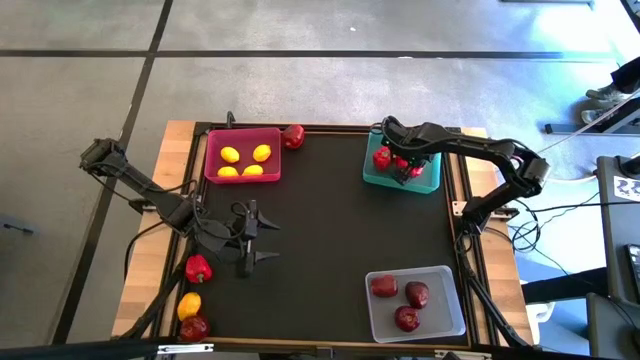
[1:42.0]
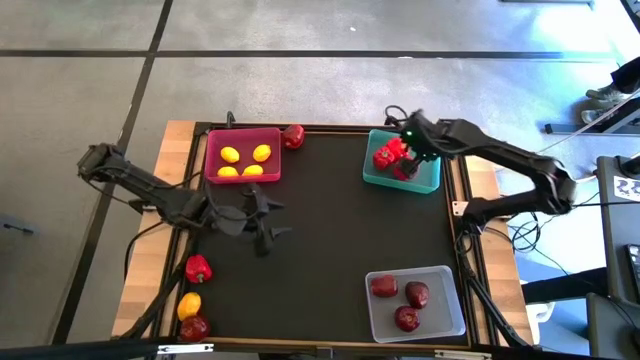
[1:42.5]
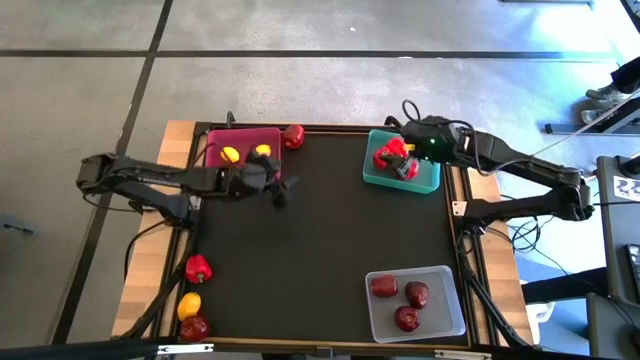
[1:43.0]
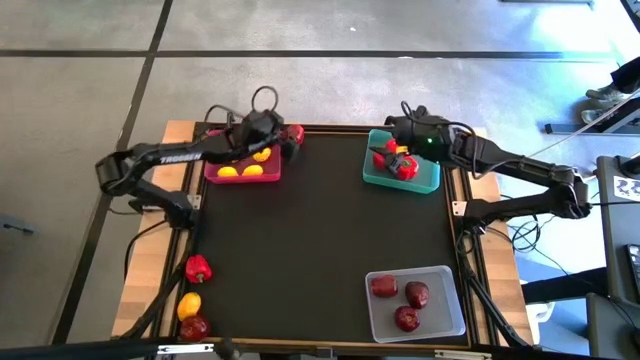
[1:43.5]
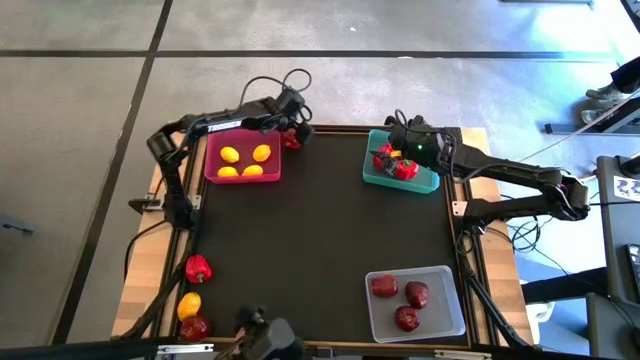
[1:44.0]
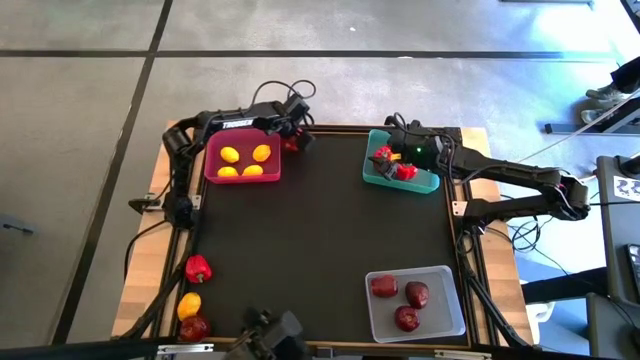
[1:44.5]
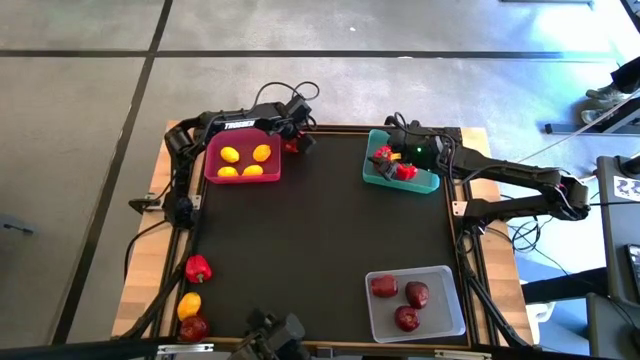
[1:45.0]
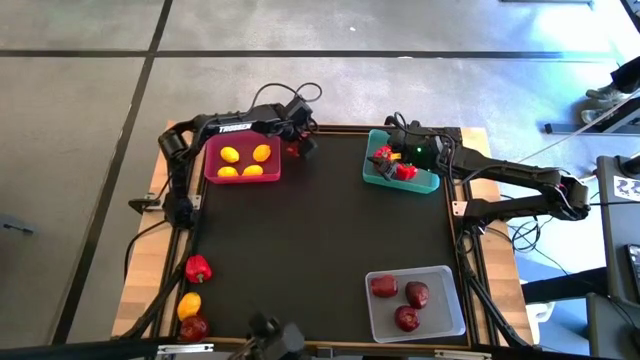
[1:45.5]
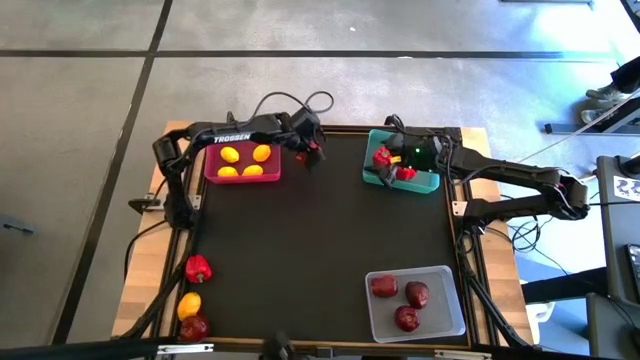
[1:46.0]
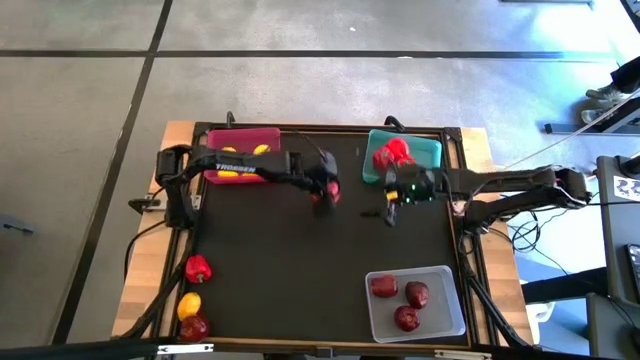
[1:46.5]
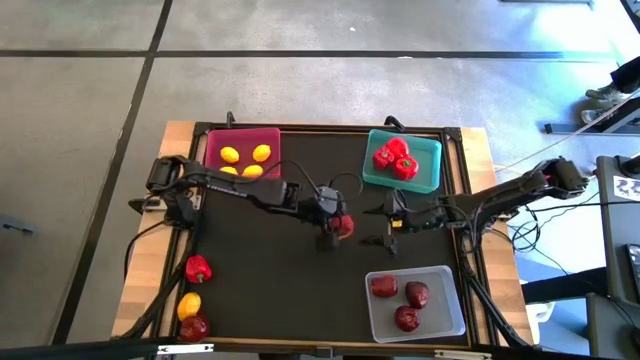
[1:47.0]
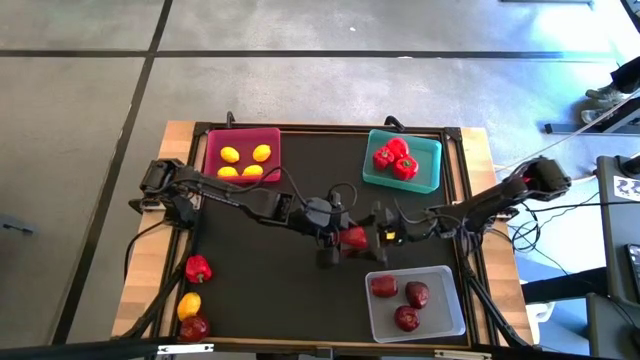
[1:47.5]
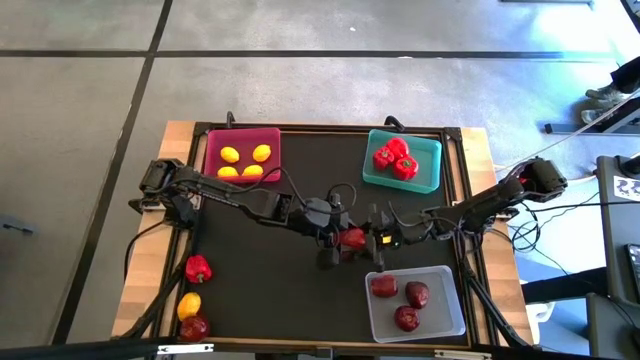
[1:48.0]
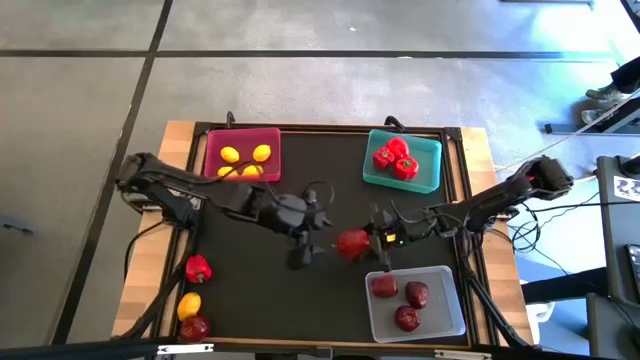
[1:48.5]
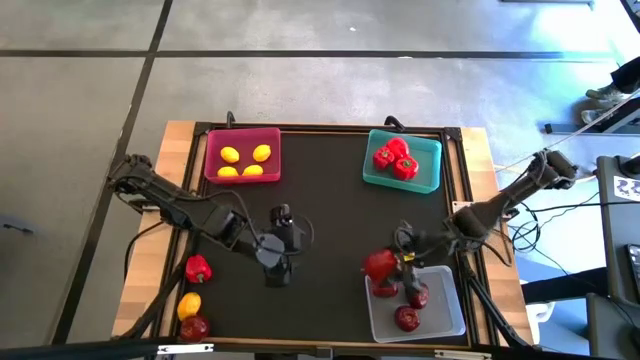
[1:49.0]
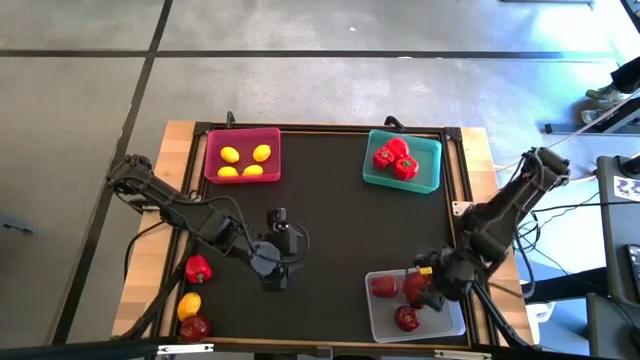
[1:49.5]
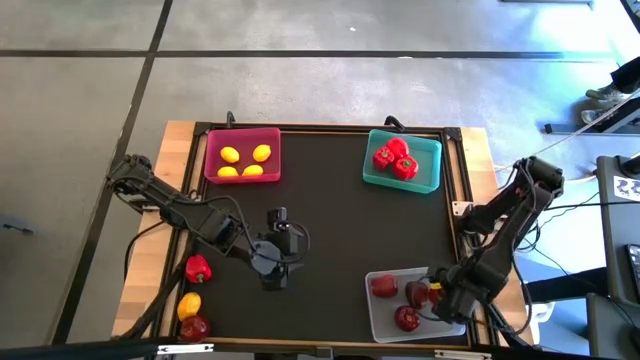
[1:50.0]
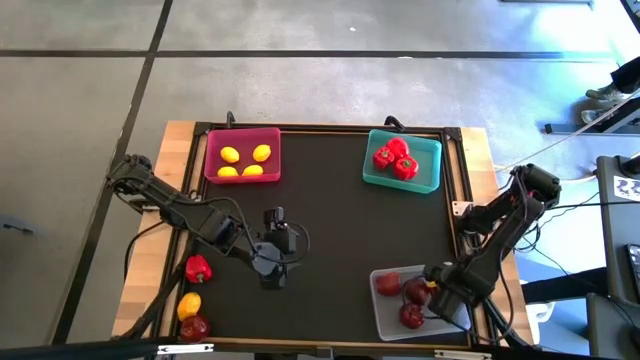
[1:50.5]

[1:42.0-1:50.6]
Task: Sort produce into baskets
Put the apple into the transparent bin

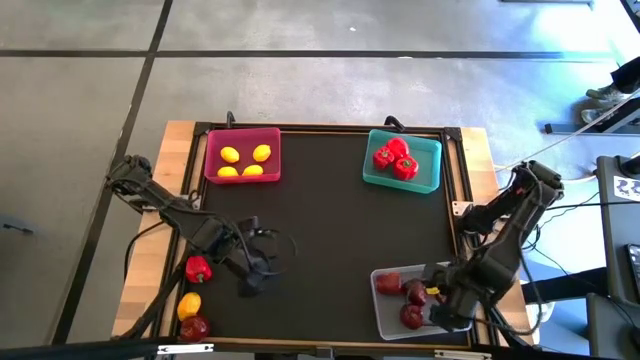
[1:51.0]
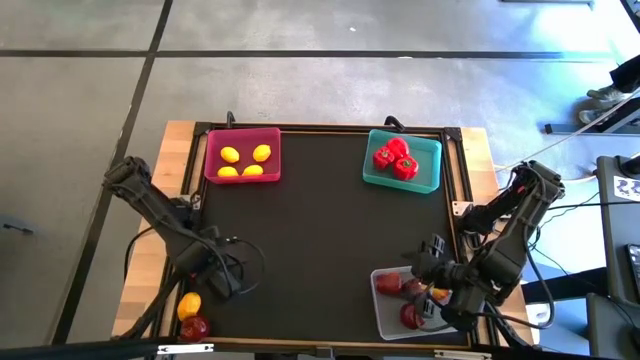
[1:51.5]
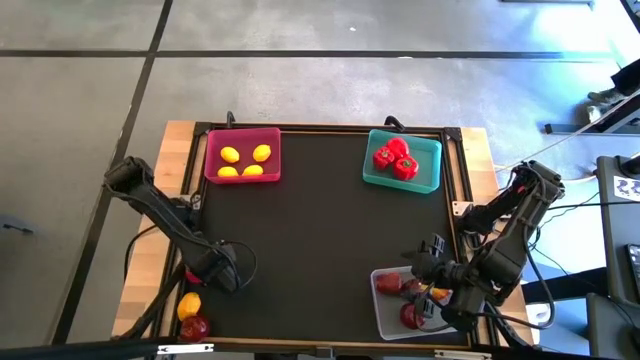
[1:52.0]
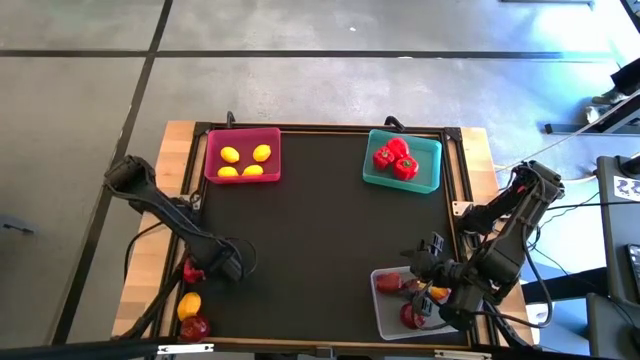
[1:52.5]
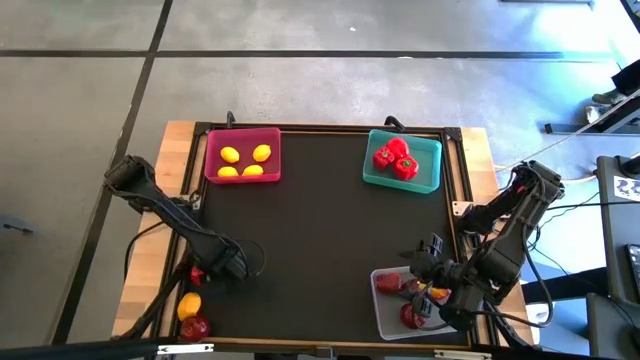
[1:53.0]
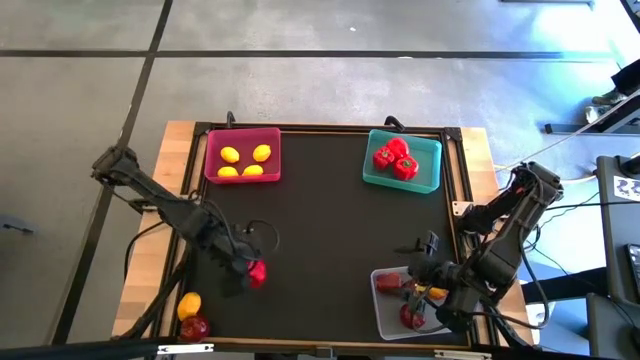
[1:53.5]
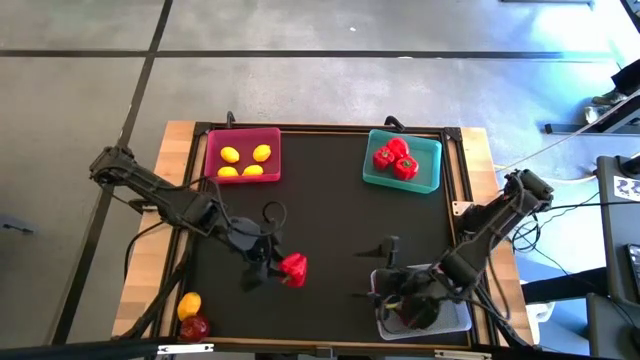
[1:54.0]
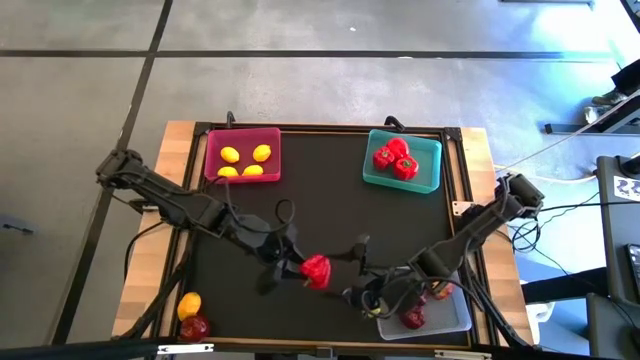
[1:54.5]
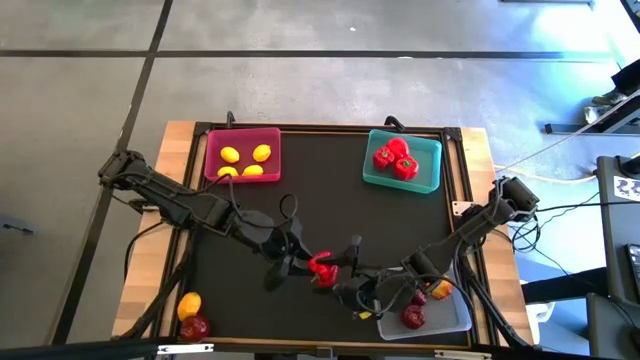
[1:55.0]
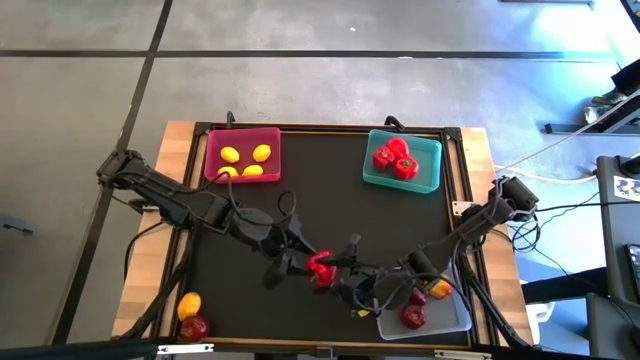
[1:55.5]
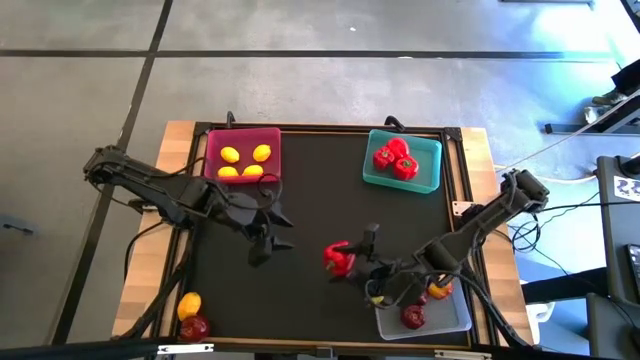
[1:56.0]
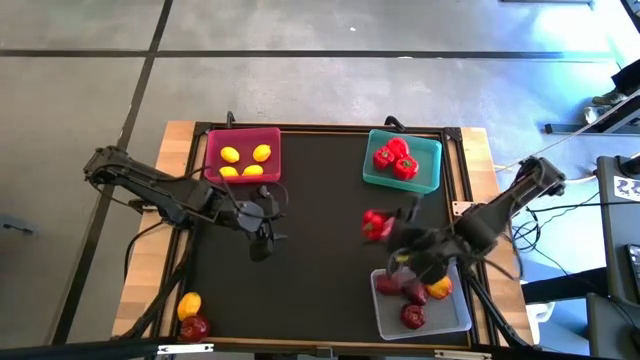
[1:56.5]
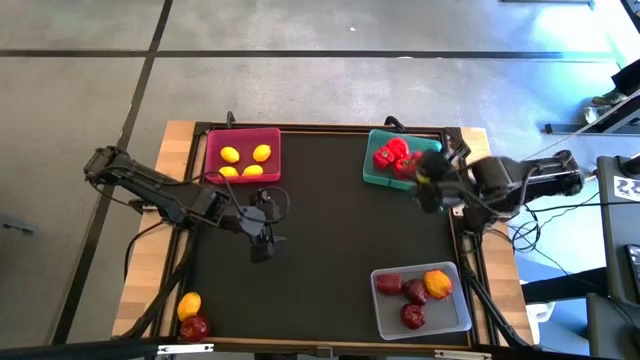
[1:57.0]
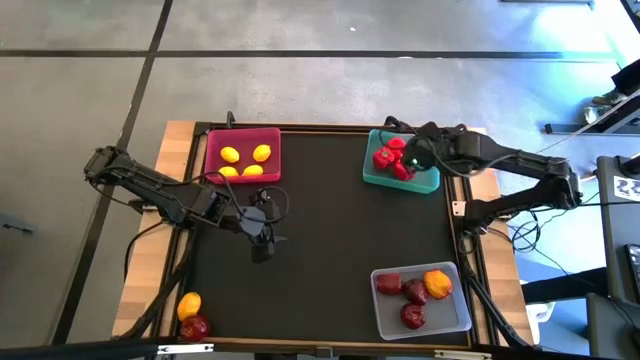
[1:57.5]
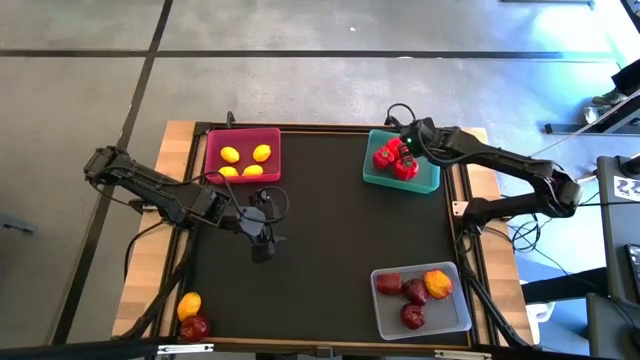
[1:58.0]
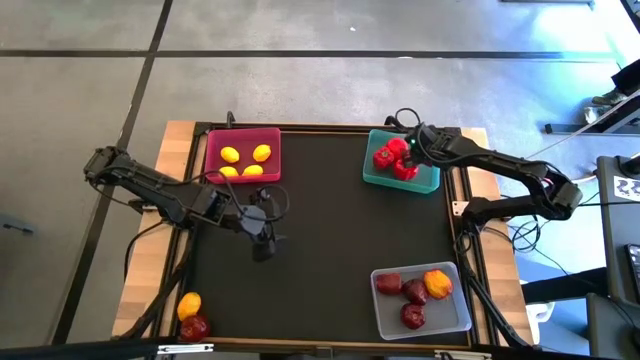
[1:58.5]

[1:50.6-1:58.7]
Put the bell pepper into the blue bin

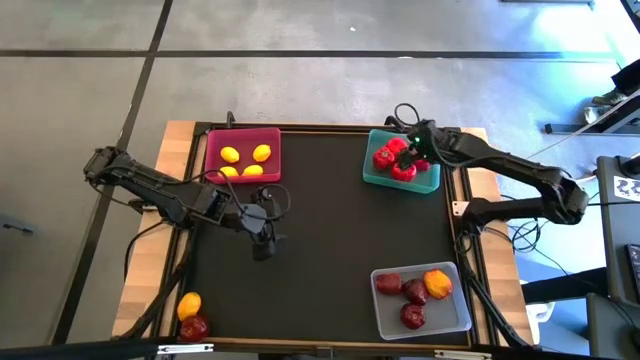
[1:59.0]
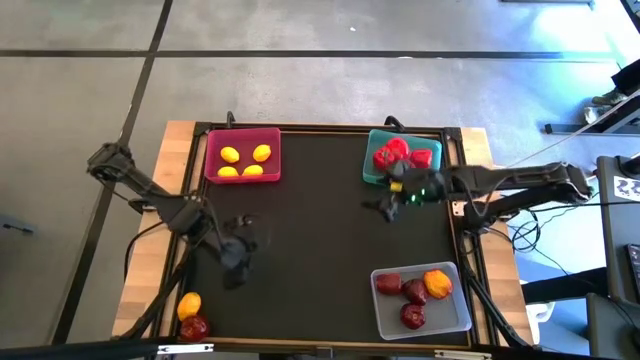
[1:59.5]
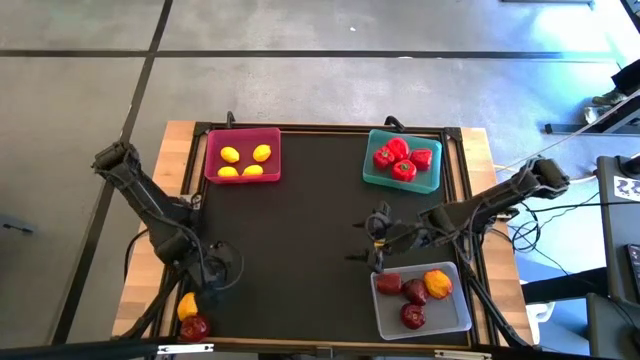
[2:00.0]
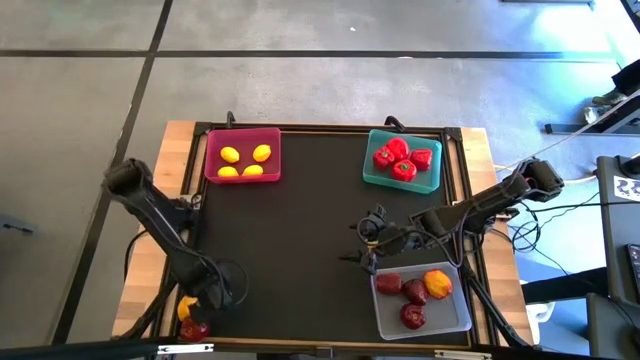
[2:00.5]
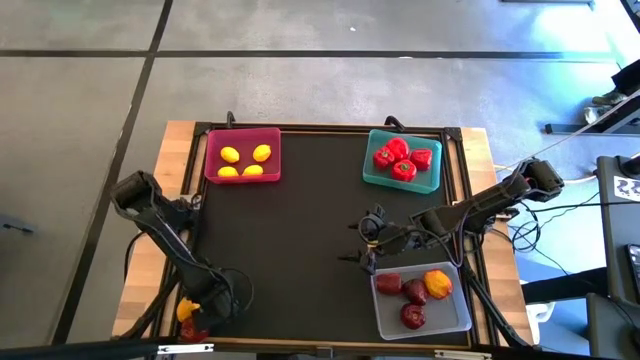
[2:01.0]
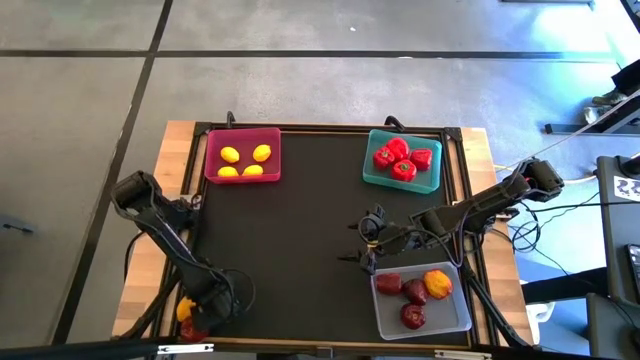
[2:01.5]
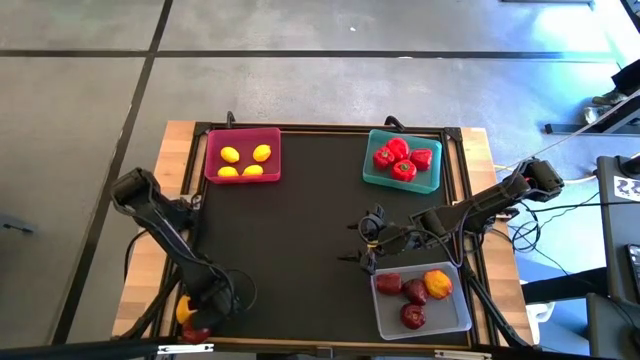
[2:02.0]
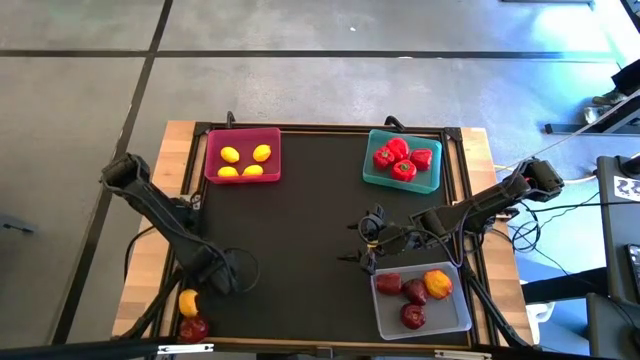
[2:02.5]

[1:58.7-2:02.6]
Put the lemon into the pink bin

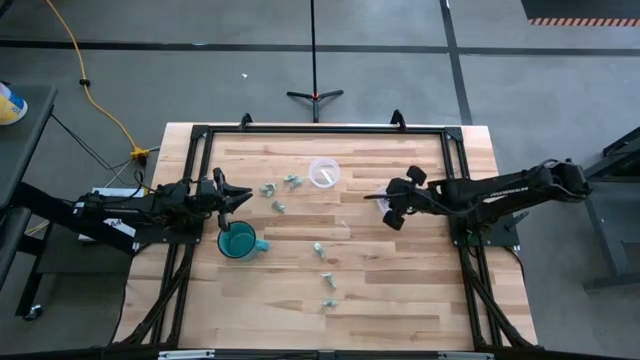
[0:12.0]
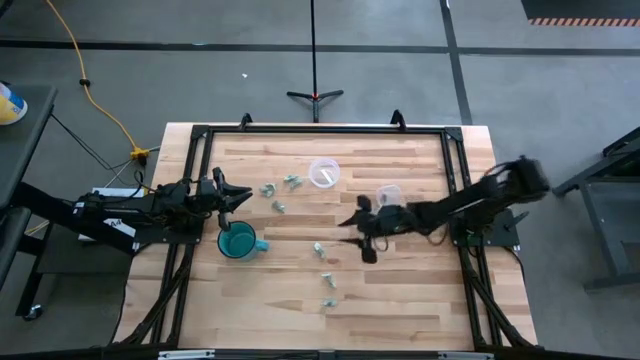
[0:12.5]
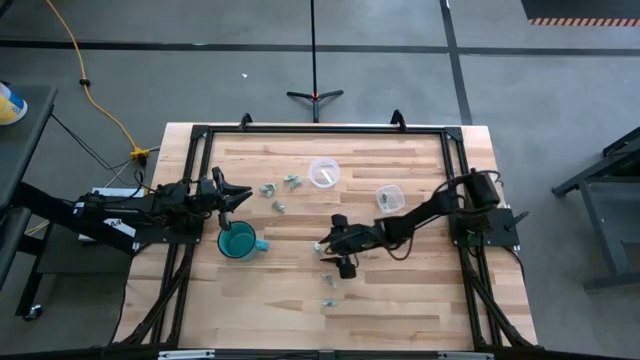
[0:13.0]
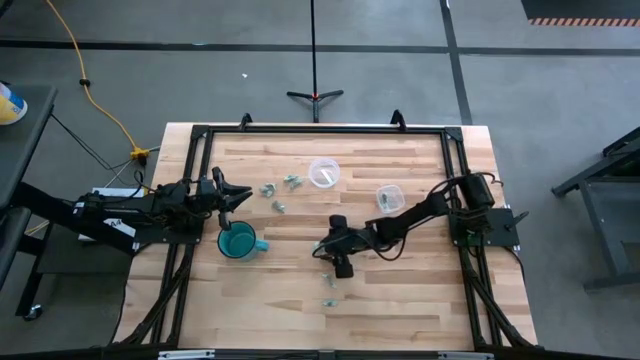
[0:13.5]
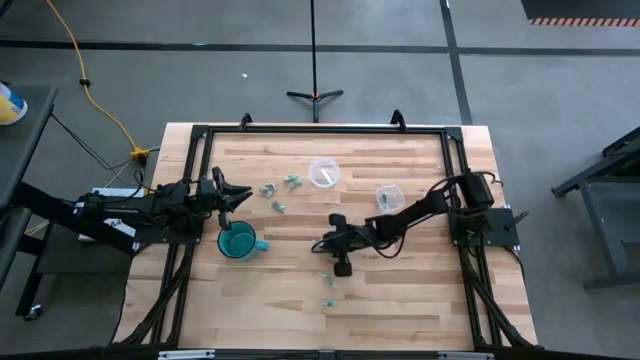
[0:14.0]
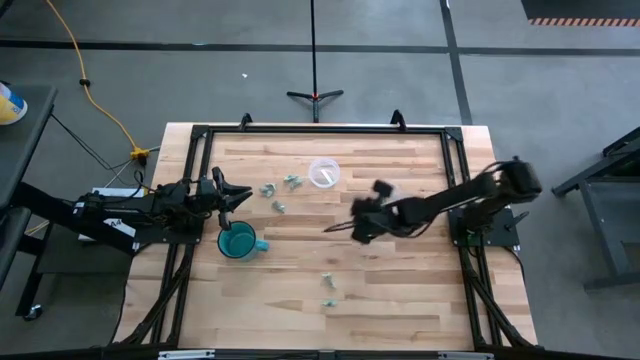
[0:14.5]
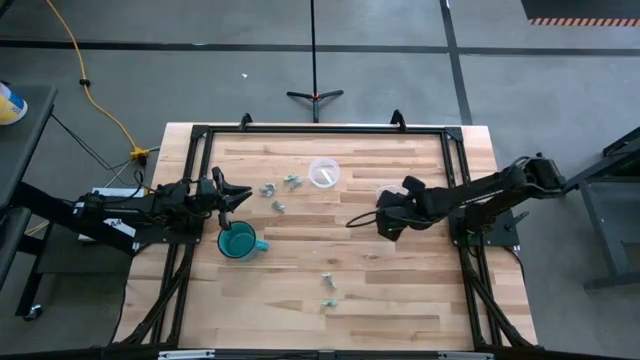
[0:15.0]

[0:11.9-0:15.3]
Task: Pick and place items into bin
Put the stevia packet into the bottom transparent bin
